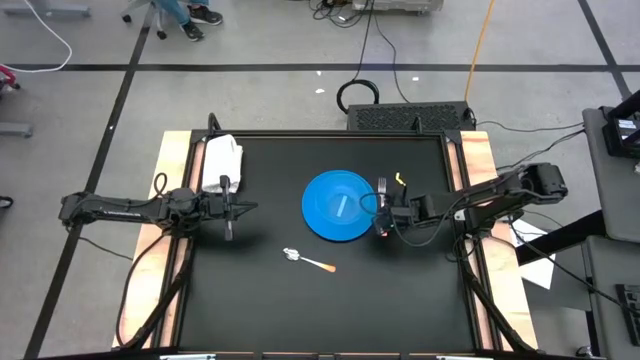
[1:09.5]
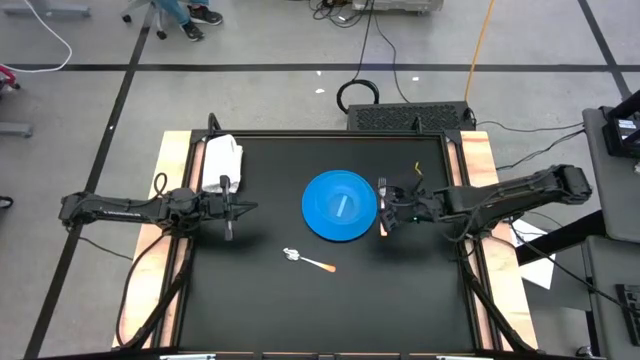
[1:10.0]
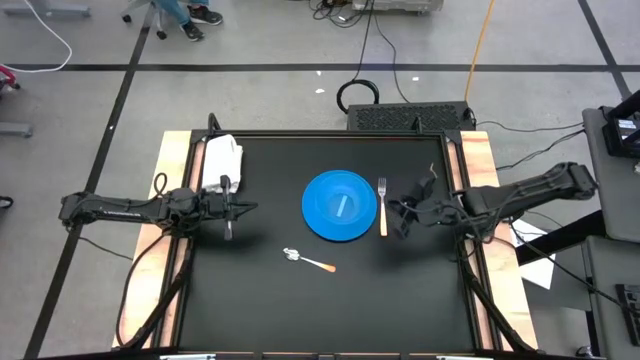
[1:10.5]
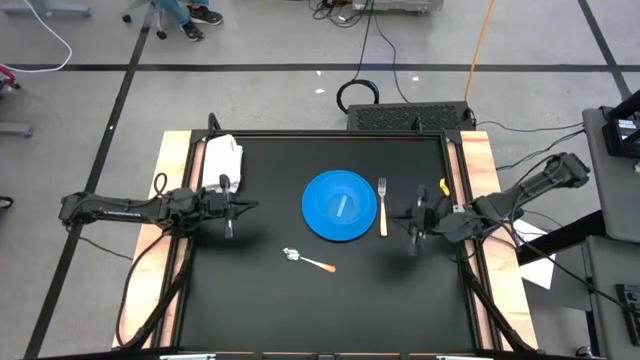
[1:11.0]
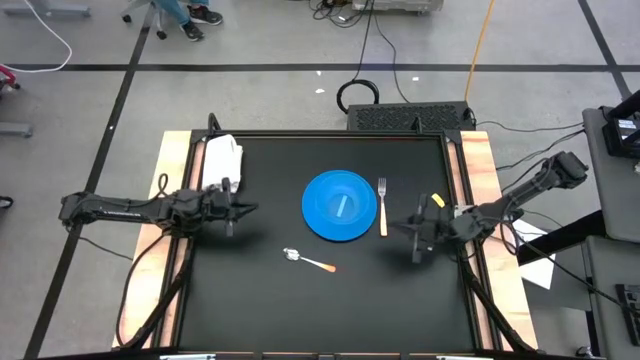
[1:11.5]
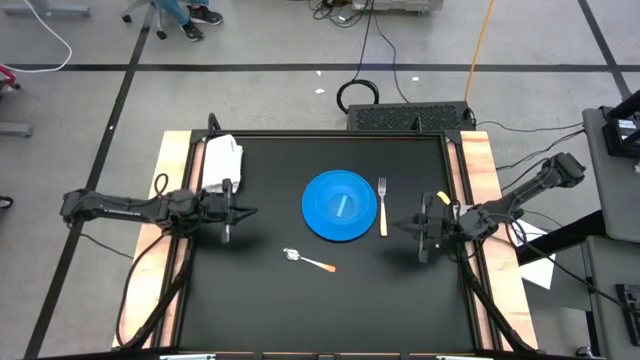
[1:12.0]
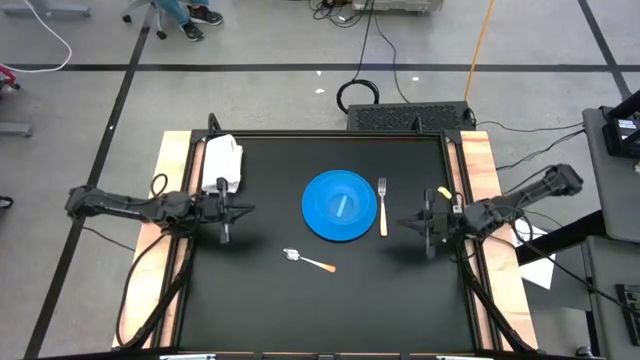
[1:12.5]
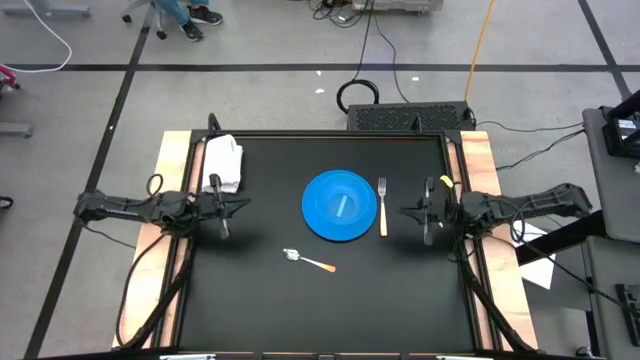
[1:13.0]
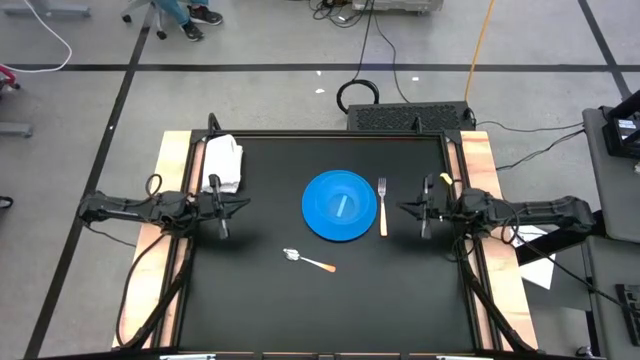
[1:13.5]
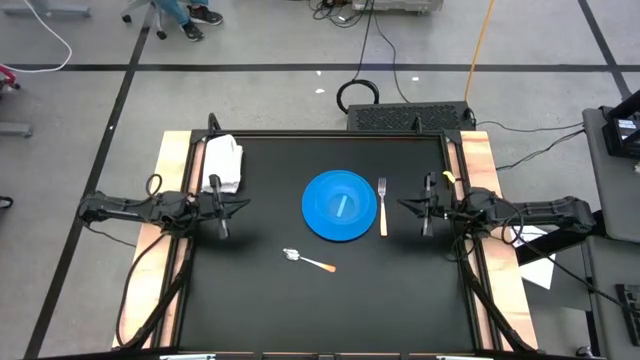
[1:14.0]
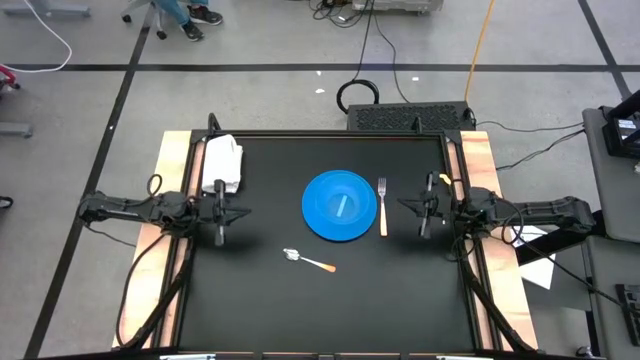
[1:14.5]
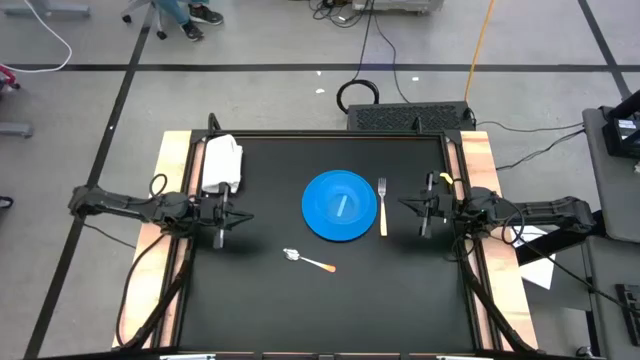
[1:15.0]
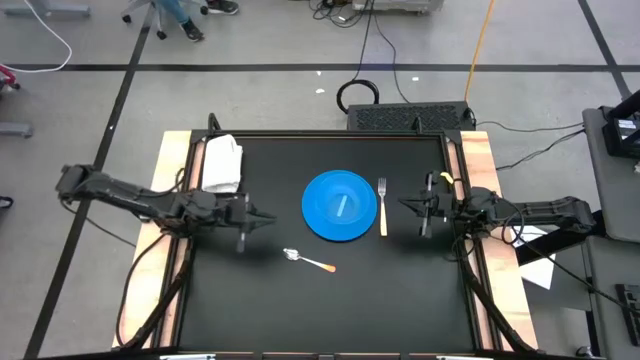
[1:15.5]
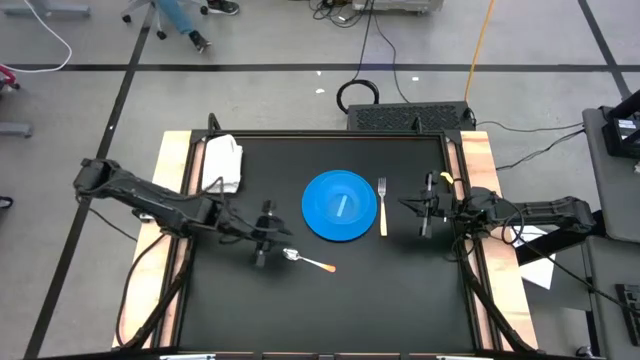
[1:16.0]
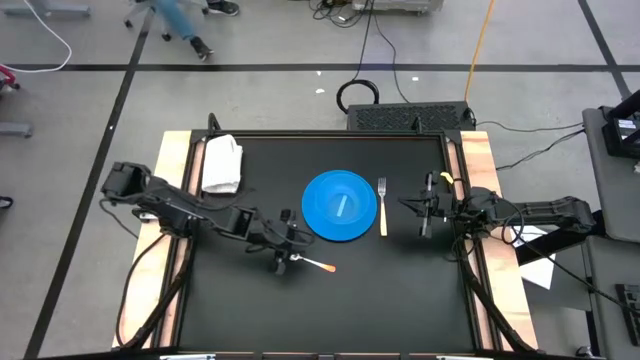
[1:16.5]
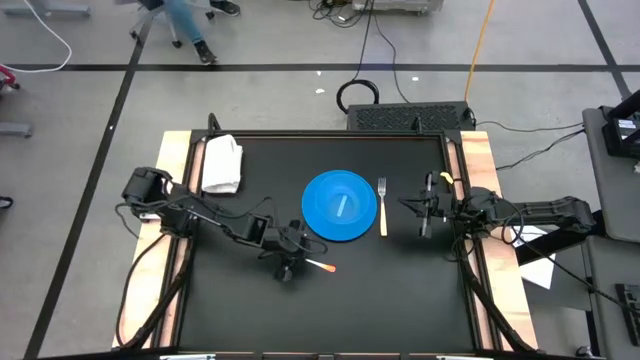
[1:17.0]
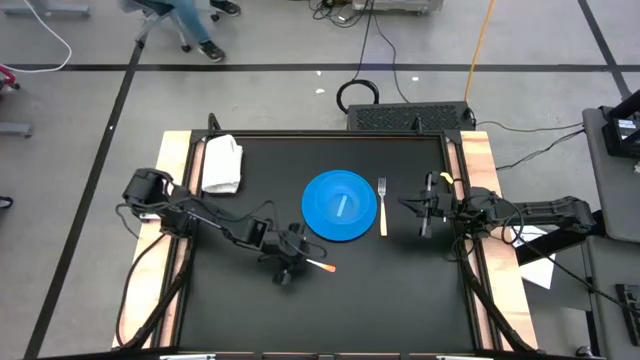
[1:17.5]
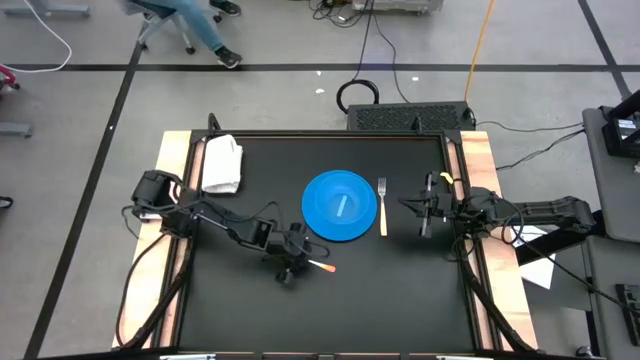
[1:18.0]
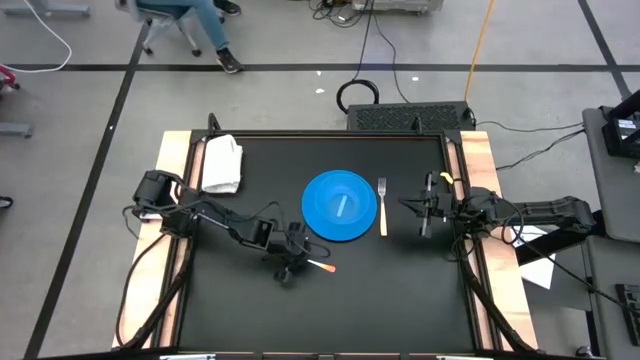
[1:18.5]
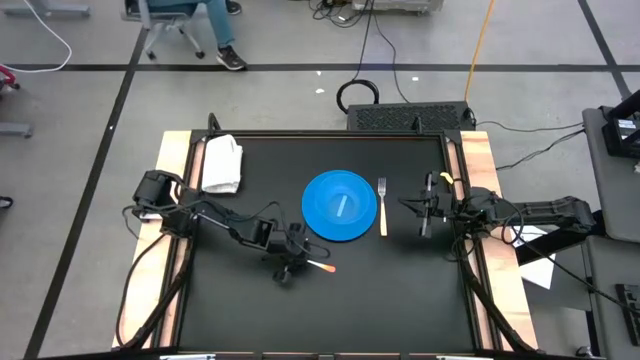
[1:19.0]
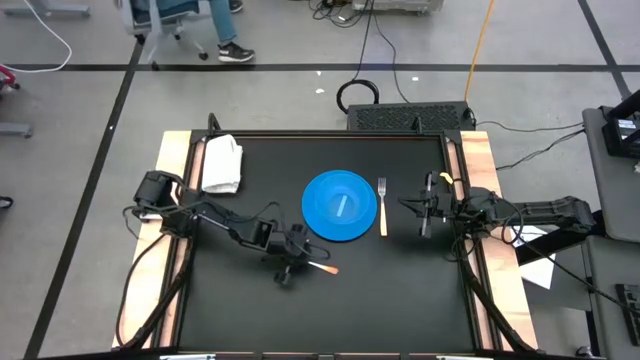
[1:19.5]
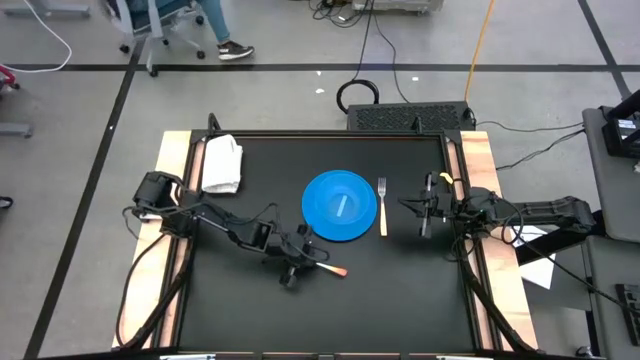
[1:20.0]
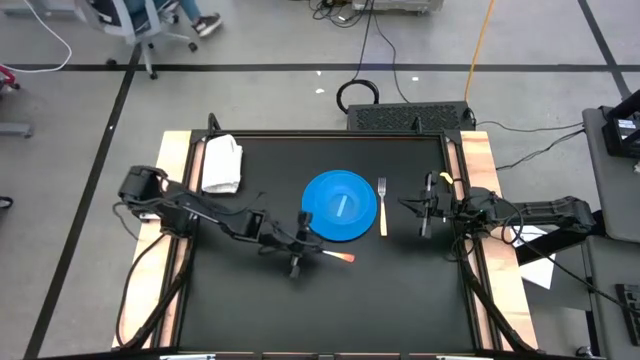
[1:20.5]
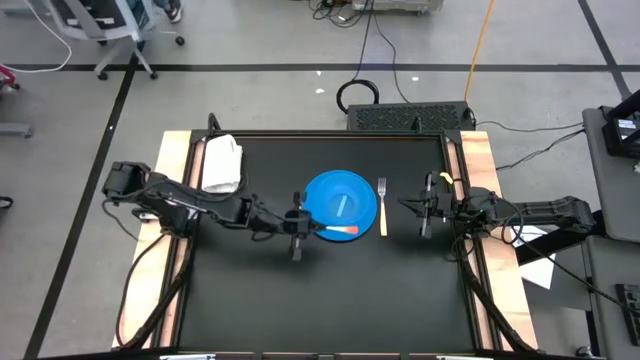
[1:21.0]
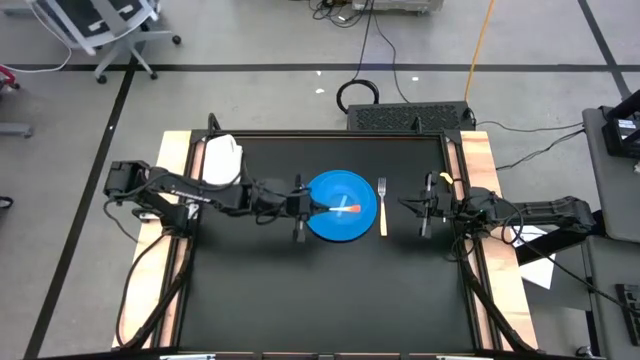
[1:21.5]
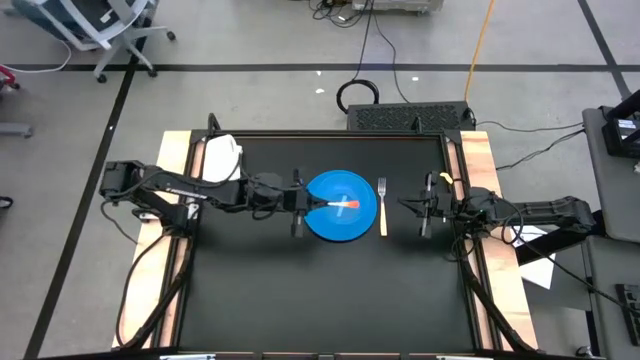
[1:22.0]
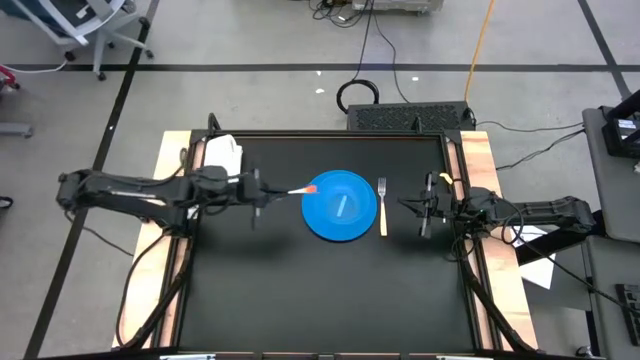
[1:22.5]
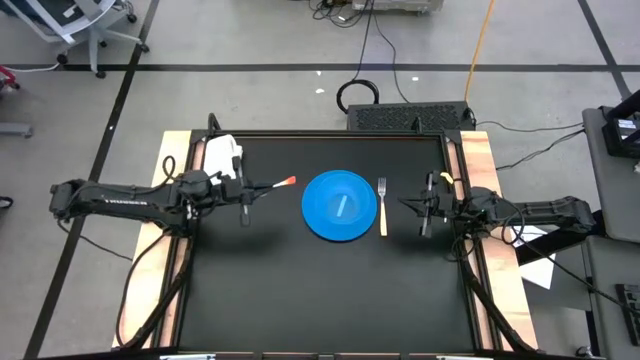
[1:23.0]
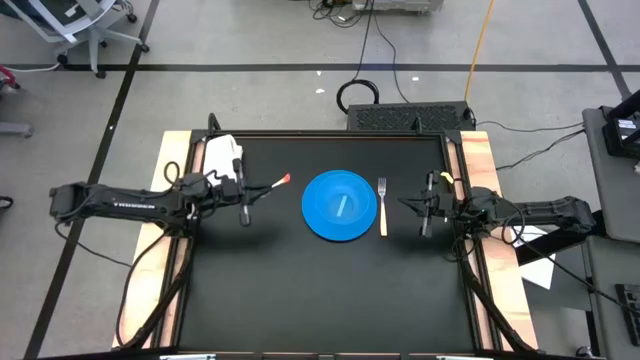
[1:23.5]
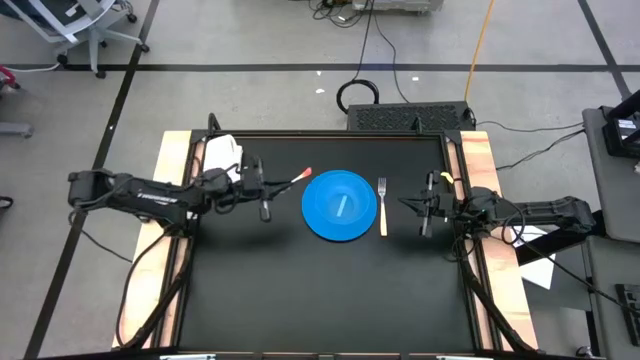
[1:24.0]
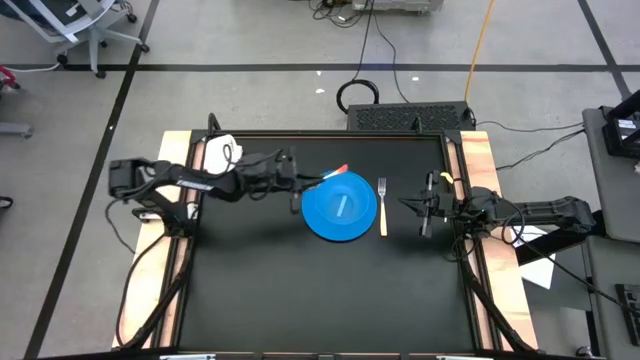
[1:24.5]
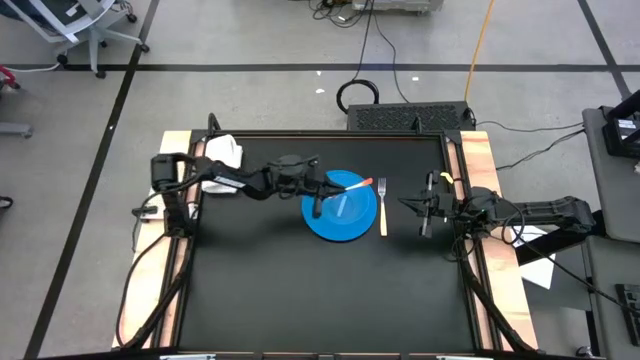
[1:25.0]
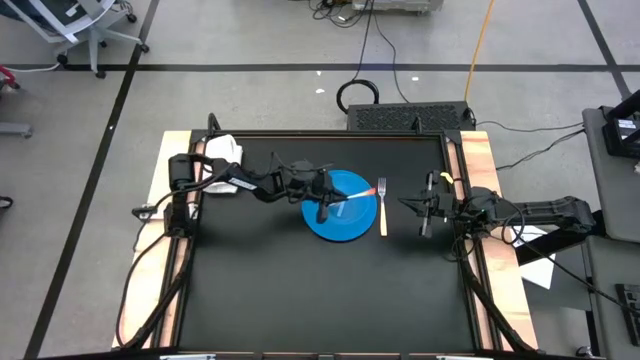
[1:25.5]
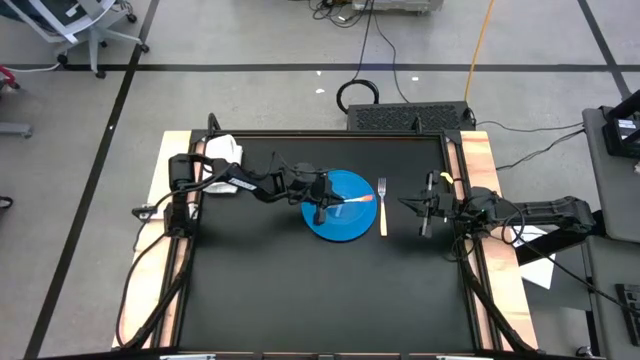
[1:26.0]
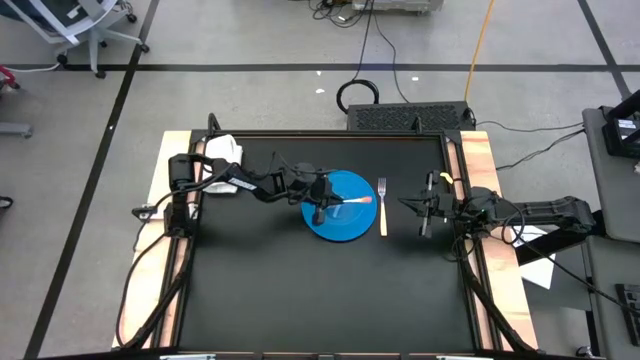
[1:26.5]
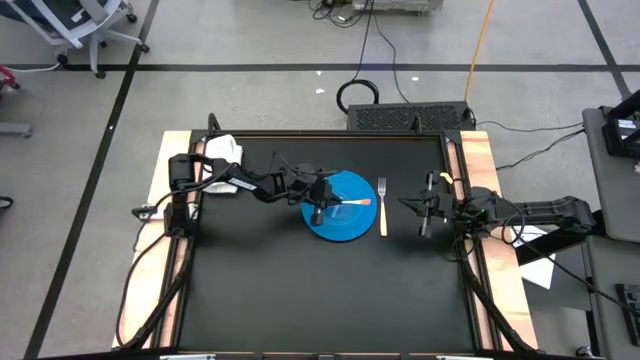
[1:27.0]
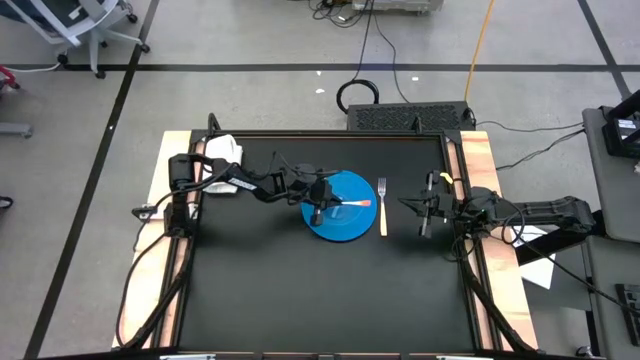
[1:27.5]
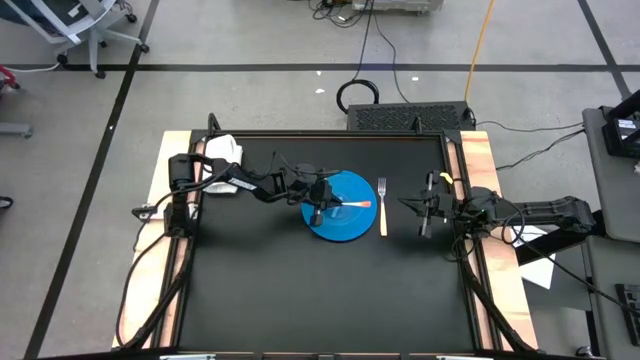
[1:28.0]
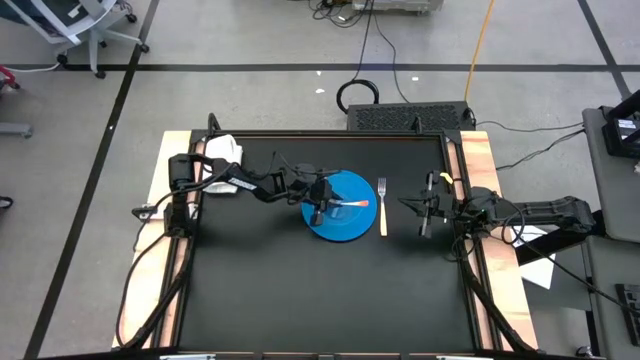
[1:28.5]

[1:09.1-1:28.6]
Task: Set table place
Put the orange spoon into the blue bowl

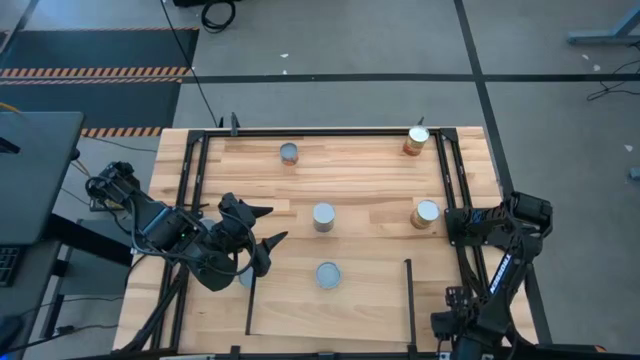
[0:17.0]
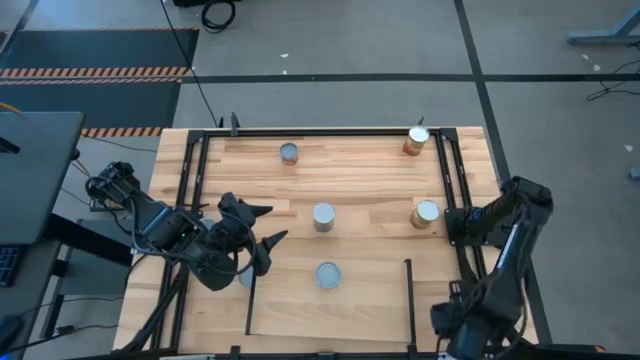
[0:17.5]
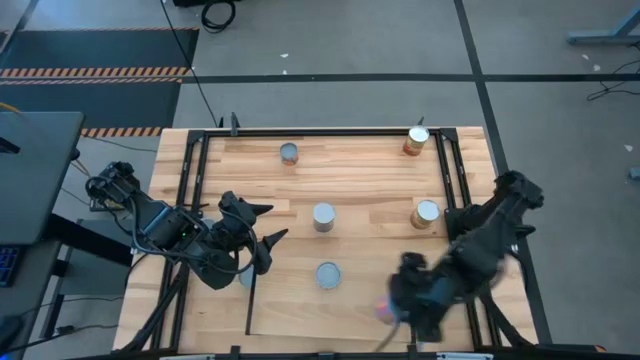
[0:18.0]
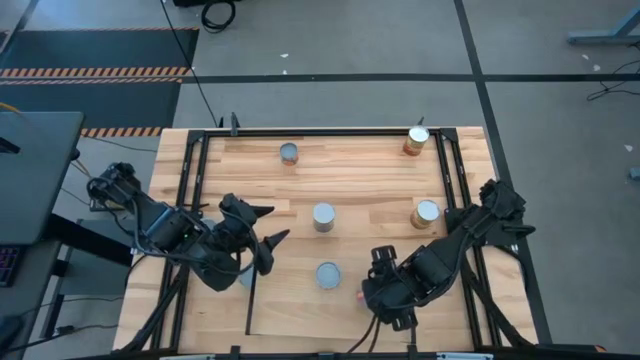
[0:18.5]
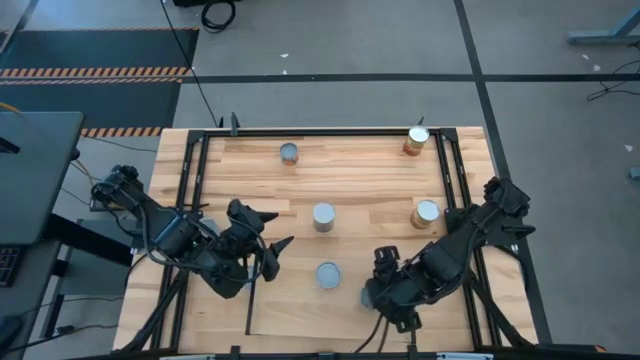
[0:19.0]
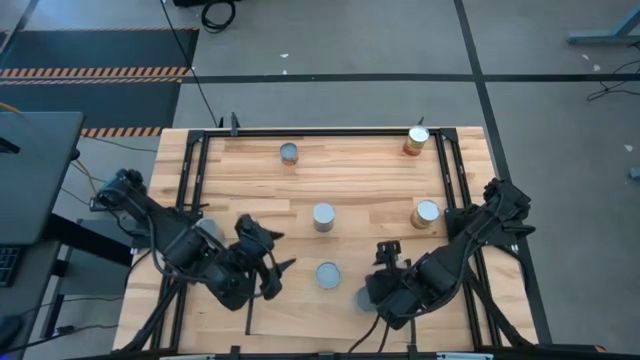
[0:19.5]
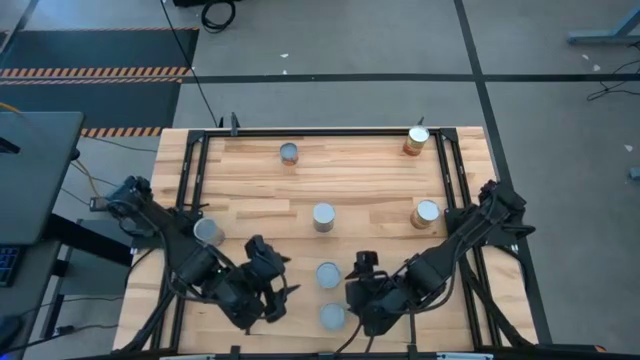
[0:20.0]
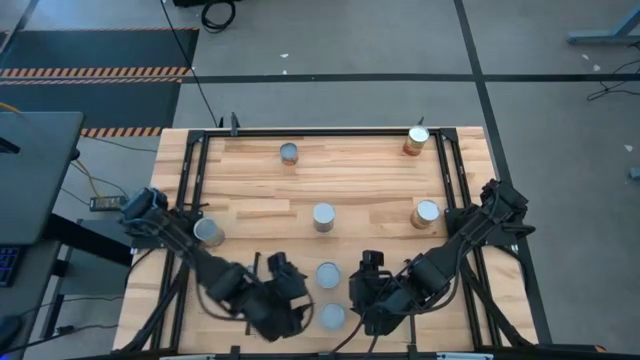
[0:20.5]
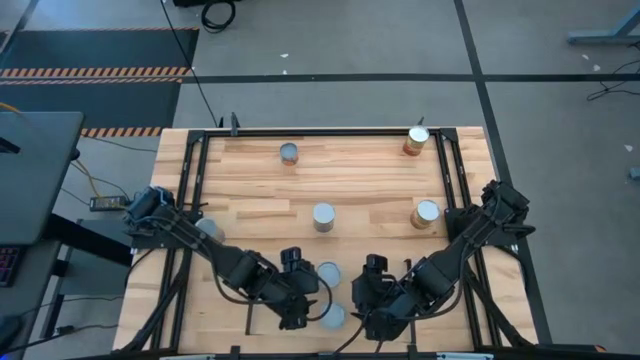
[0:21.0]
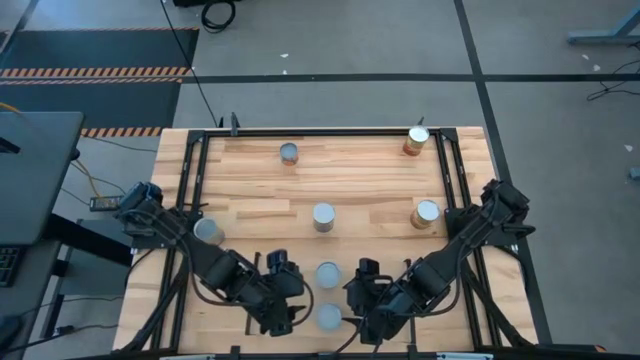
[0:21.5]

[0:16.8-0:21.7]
Task: Pick and place cans onto a shelf
Put the blue canned corn on the shelf
